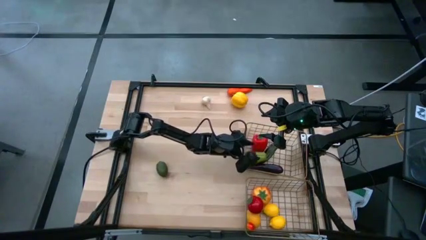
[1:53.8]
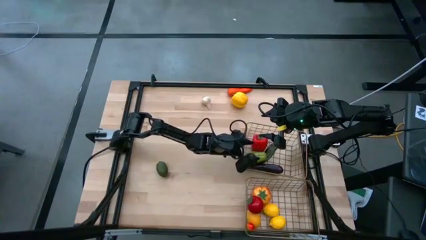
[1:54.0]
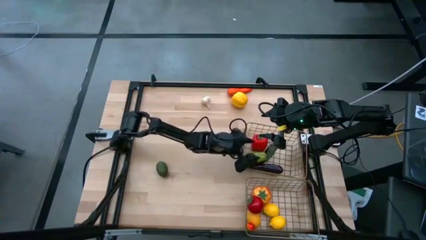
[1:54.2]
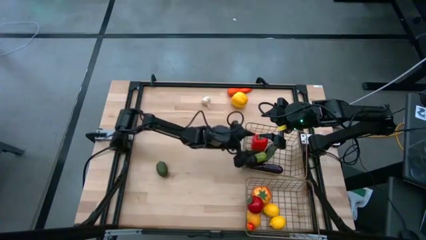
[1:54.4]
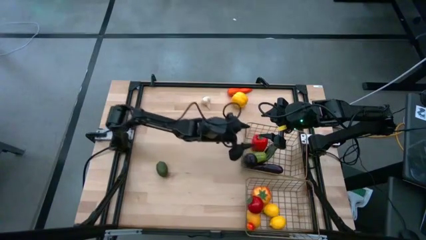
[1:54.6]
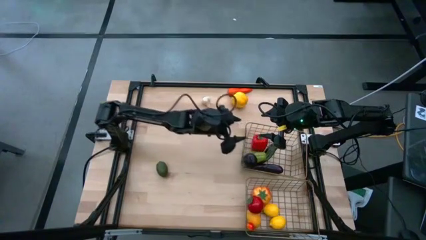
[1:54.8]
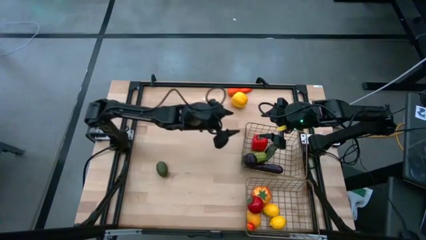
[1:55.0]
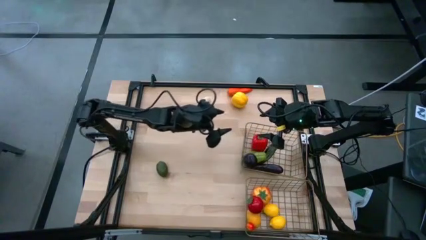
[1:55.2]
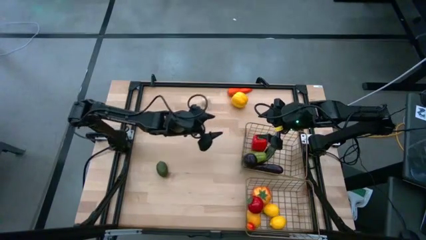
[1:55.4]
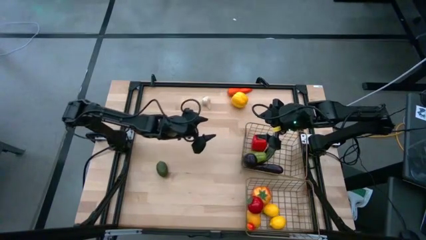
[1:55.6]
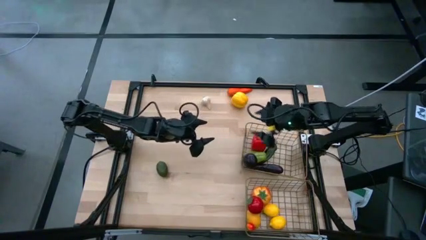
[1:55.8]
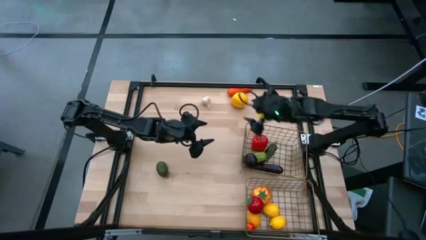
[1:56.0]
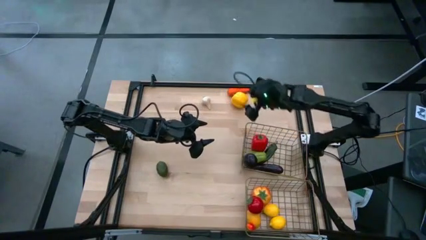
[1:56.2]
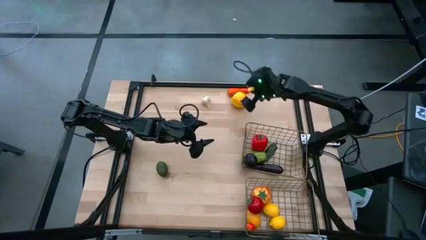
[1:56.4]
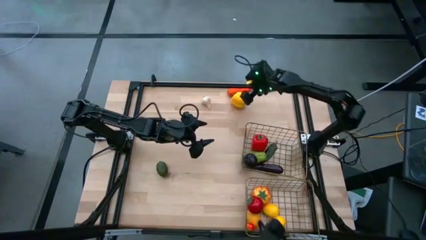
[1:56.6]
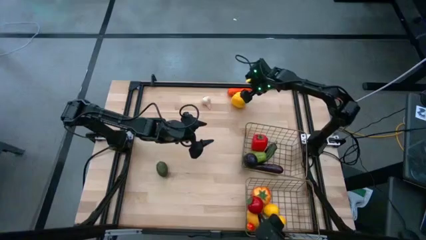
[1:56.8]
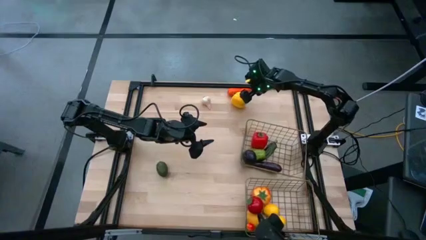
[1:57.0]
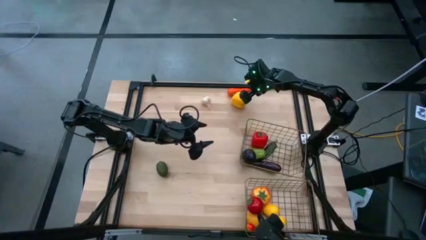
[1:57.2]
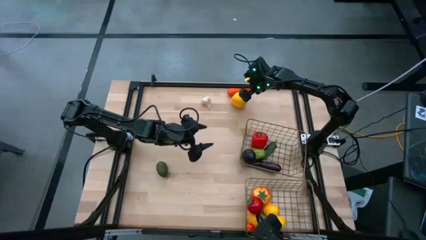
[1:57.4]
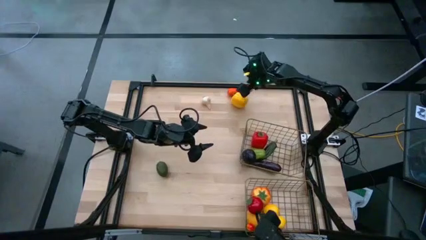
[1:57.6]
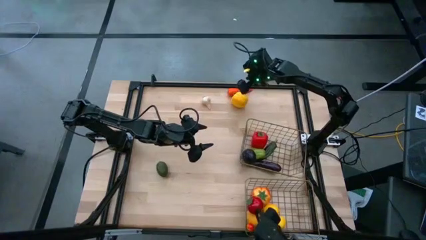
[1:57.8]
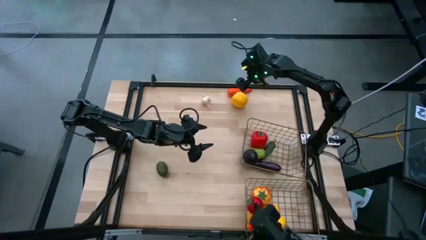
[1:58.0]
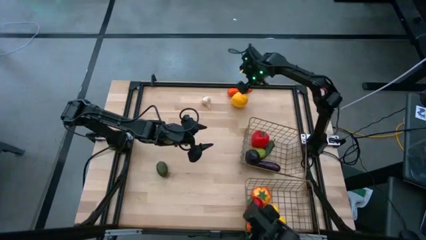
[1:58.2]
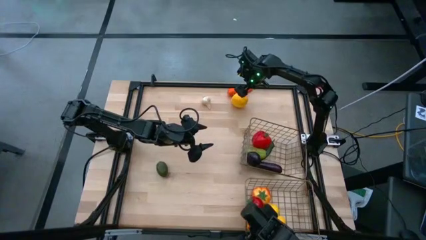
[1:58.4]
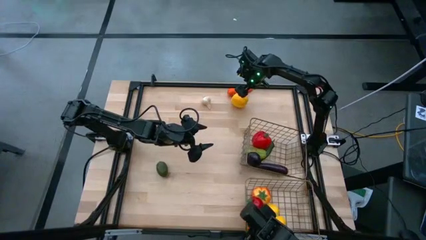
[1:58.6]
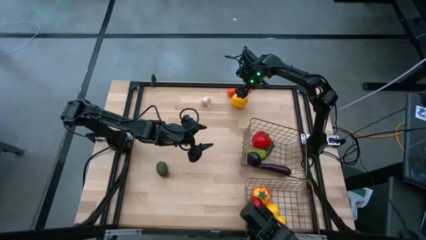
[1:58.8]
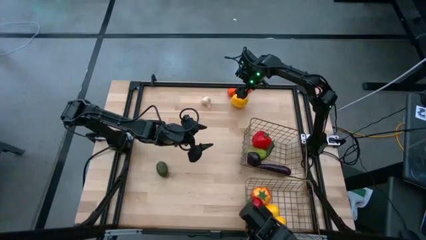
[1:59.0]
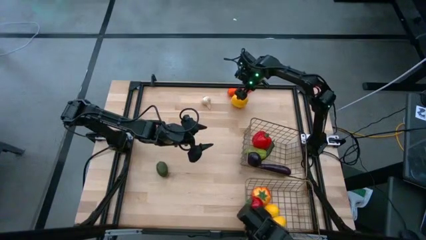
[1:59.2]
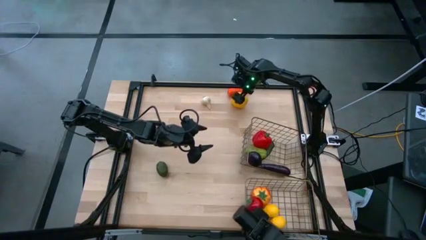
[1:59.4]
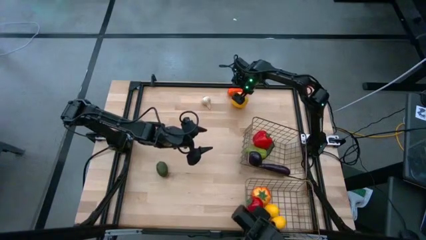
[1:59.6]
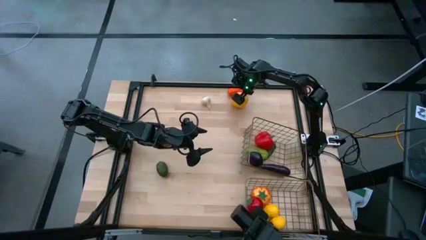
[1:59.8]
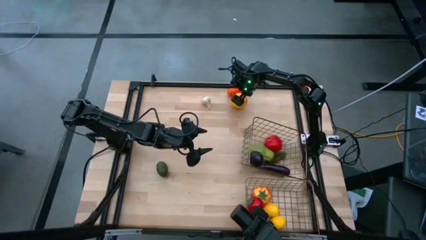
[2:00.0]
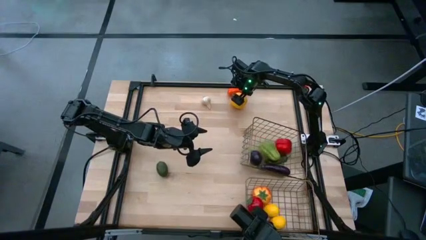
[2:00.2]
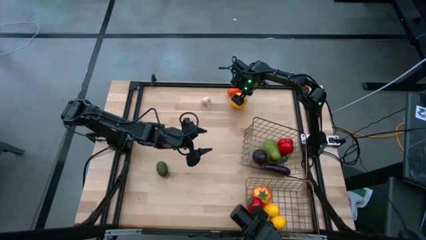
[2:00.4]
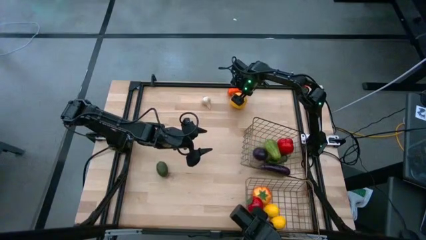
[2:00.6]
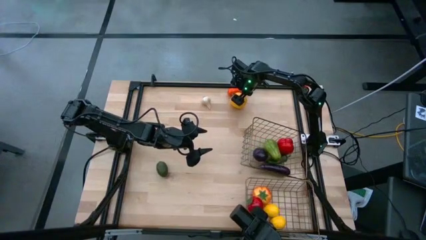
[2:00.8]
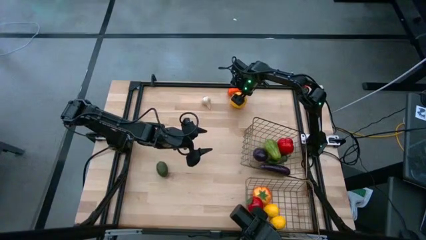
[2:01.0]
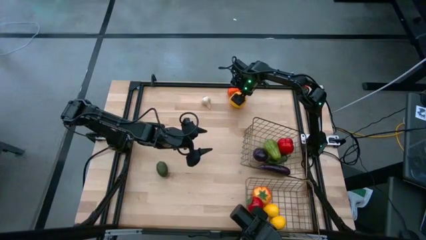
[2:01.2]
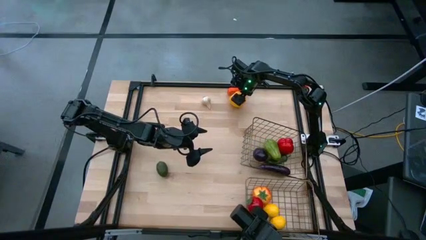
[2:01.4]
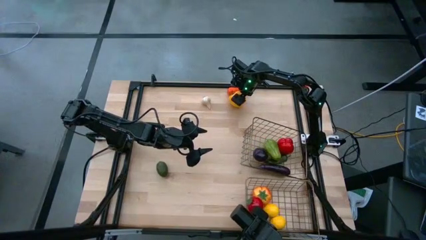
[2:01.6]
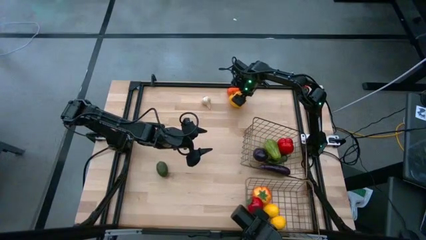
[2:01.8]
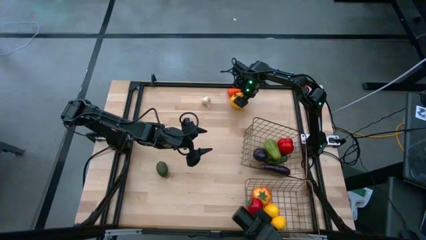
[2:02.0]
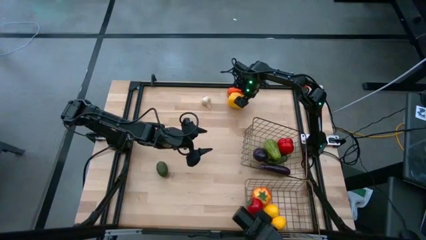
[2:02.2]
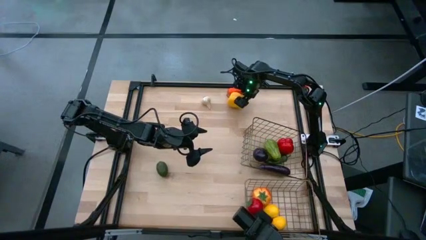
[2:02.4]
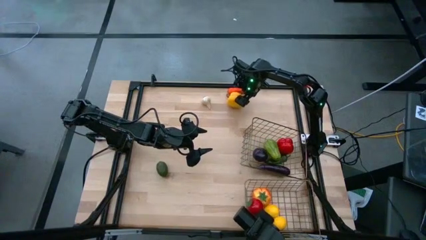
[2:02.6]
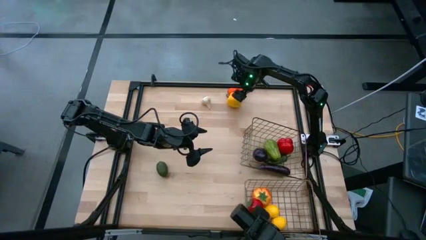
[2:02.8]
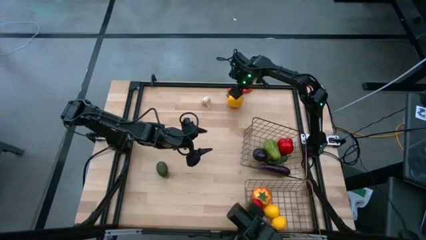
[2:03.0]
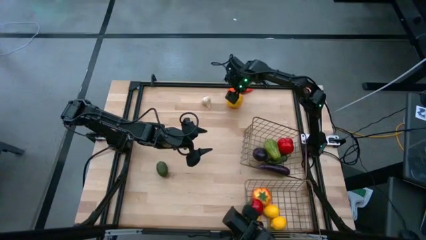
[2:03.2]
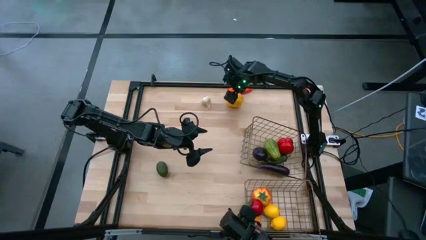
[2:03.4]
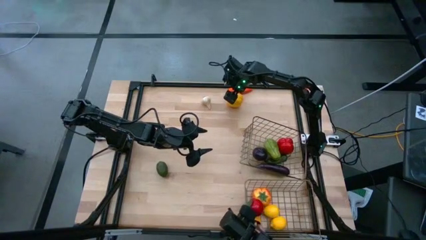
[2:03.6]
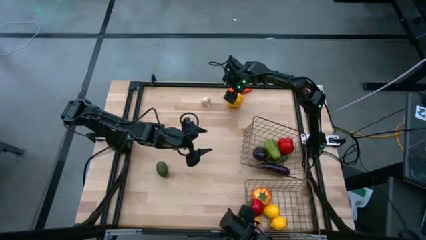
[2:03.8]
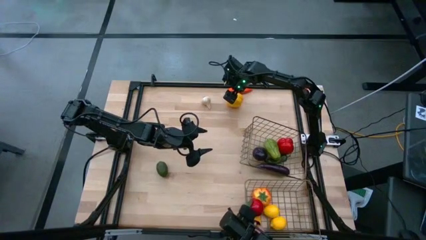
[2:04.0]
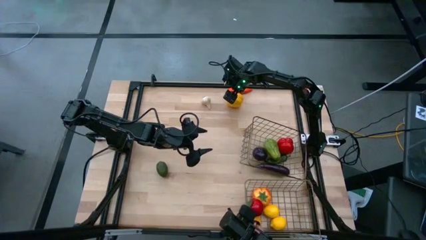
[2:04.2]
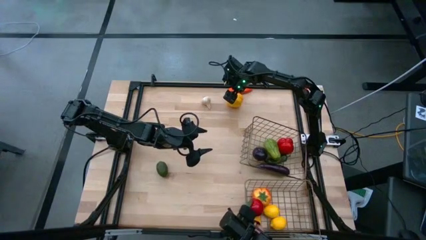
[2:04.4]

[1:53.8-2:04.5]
Task: Sort produce into baskets
Put the yellow bell pepper into the top wire basket

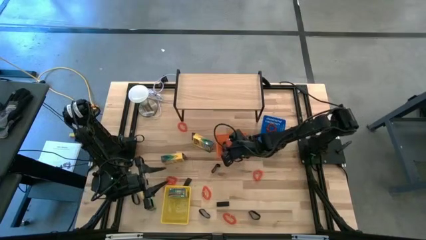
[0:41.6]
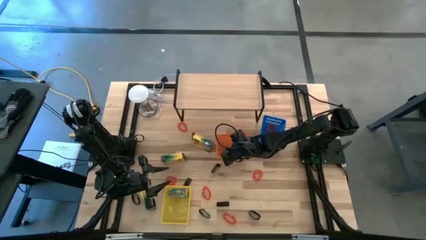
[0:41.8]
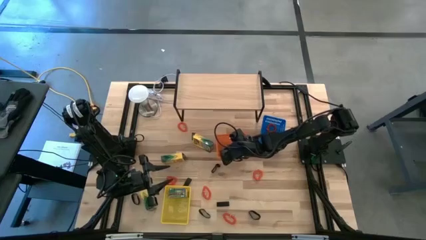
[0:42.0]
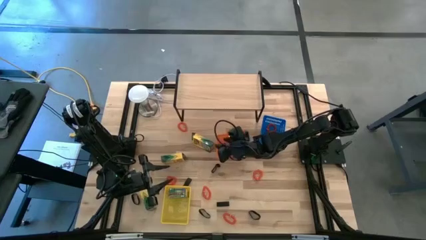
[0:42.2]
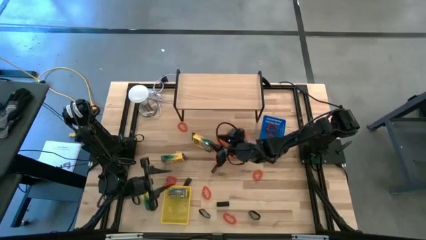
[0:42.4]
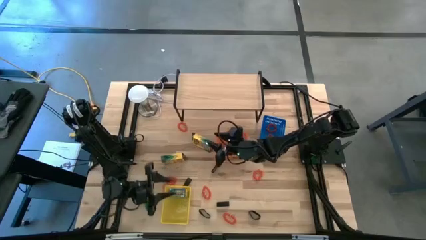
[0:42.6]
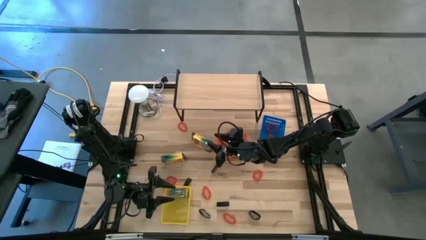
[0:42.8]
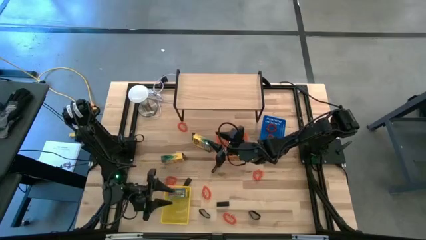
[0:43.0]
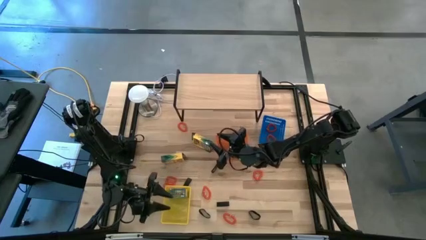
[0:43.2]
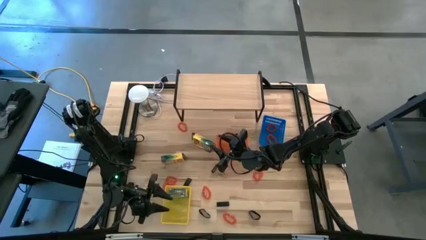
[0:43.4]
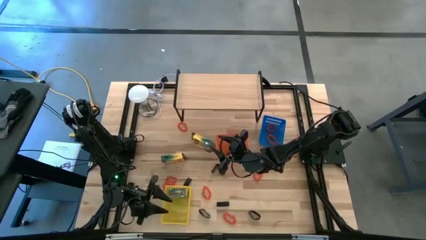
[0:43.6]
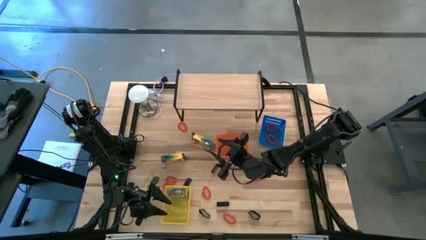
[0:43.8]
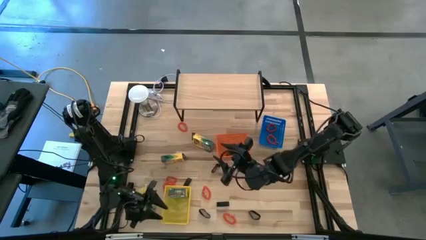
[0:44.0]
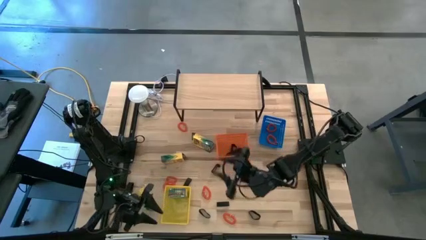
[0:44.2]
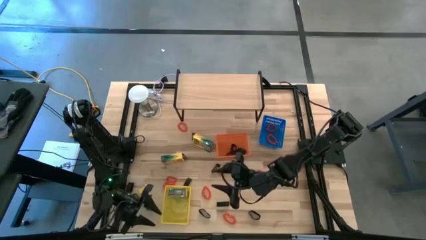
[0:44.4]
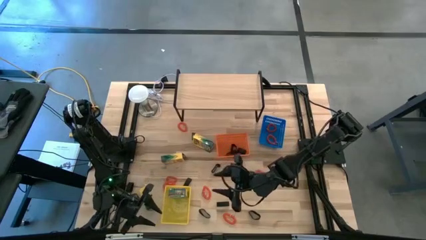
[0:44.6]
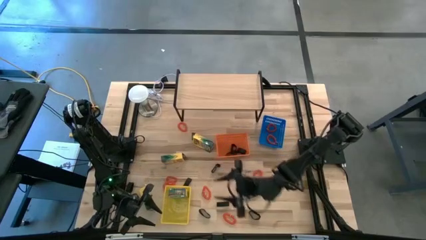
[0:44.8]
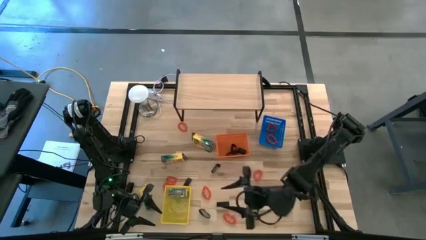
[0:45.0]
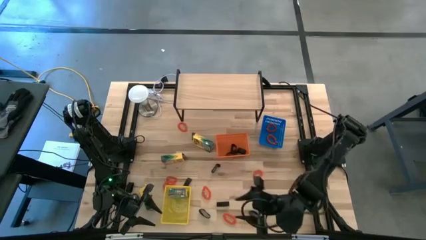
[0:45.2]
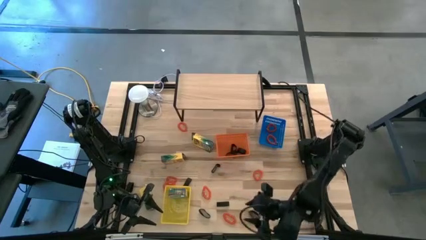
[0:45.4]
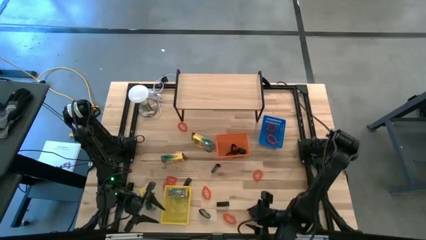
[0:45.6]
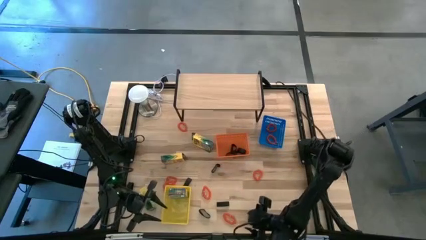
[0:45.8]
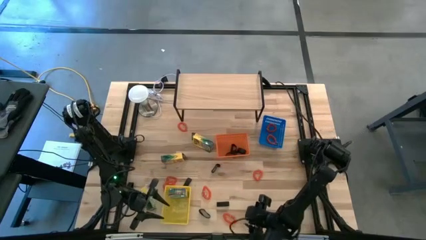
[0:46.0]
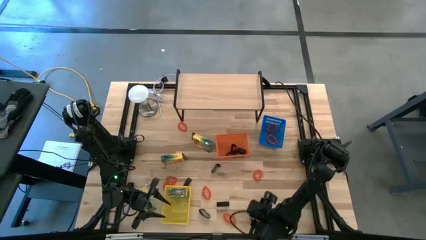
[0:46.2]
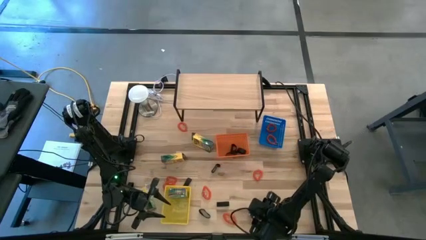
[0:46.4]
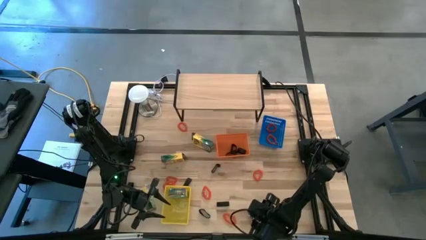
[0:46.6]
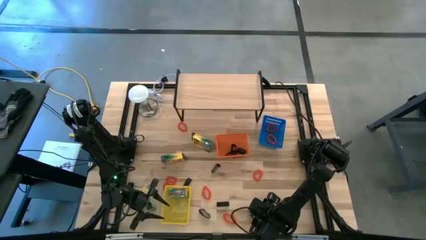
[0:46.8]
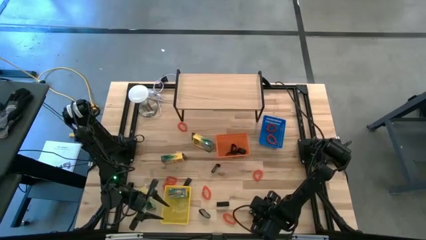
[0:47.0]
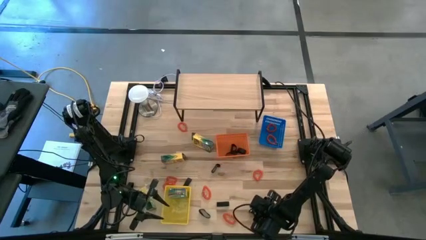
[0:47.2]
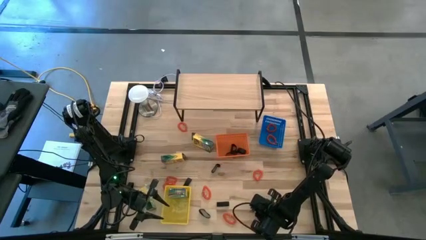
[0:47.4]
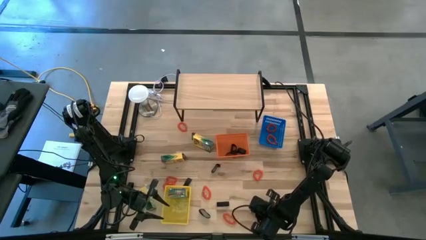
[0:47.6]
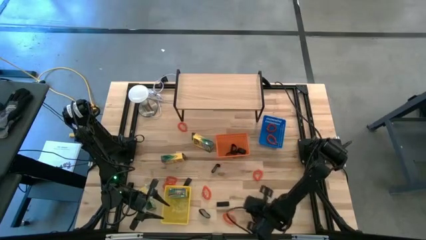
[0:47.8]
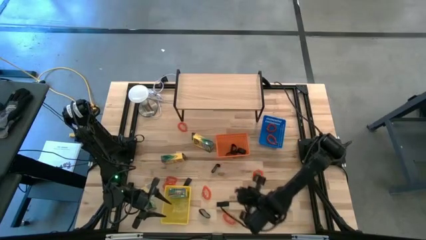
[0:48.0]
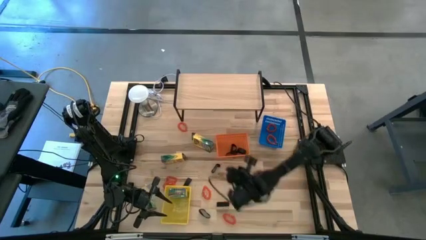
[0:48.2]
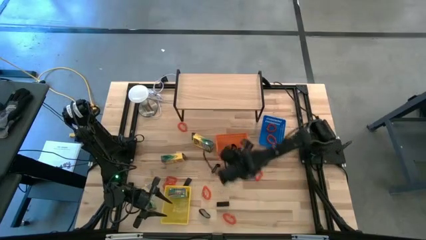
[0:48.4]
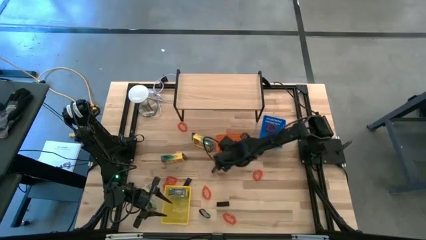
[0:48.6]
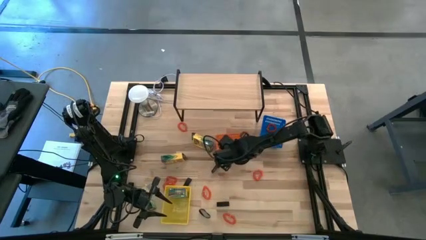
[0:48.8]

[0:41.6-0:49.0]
Task: Pick & Place Office Desk Supplies
Put the rubberband into the orange bin
